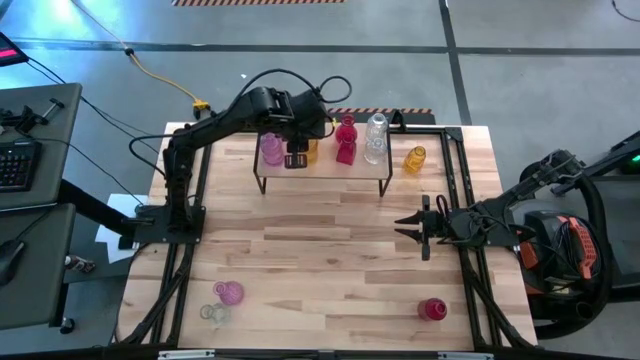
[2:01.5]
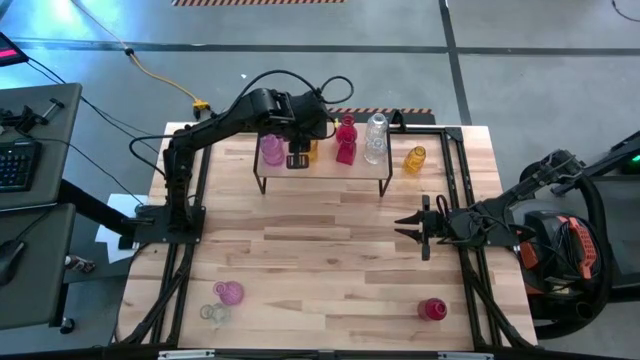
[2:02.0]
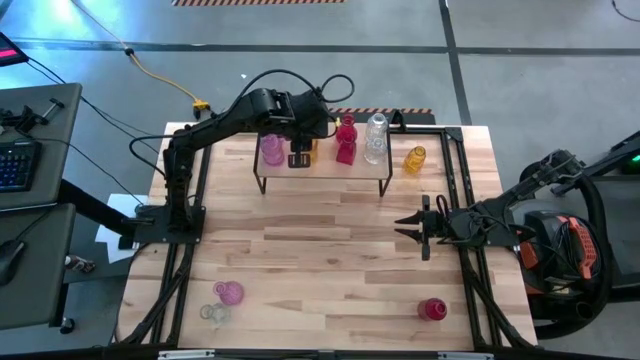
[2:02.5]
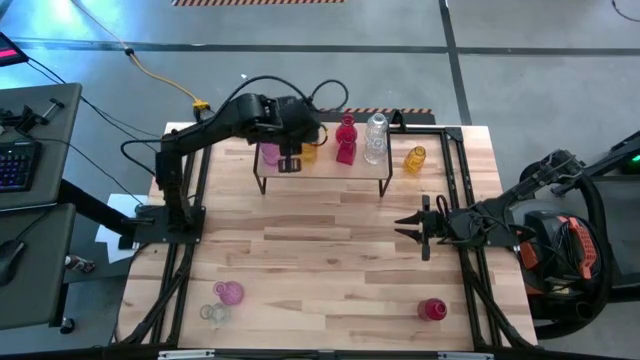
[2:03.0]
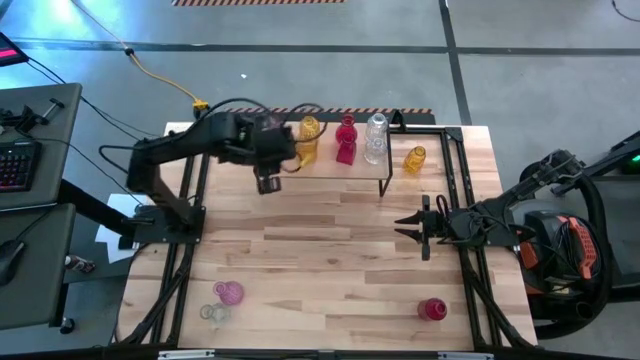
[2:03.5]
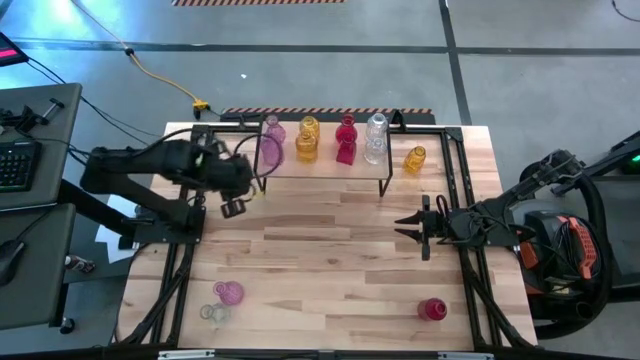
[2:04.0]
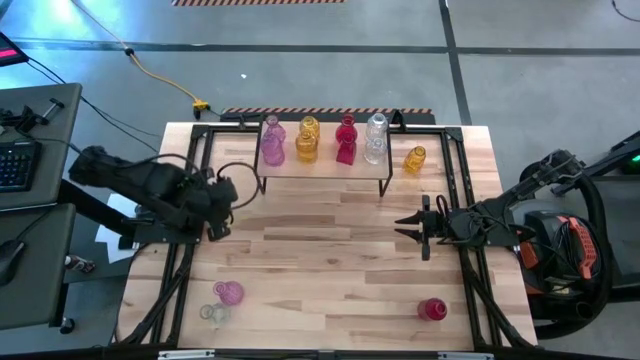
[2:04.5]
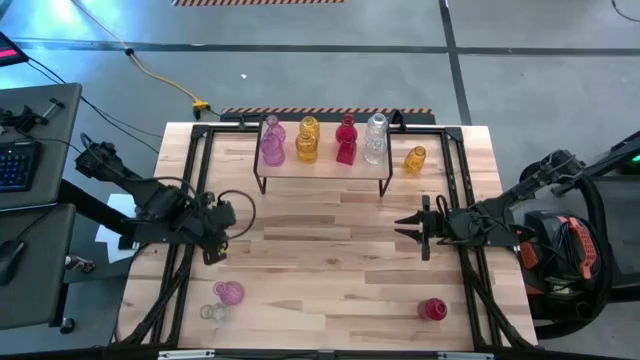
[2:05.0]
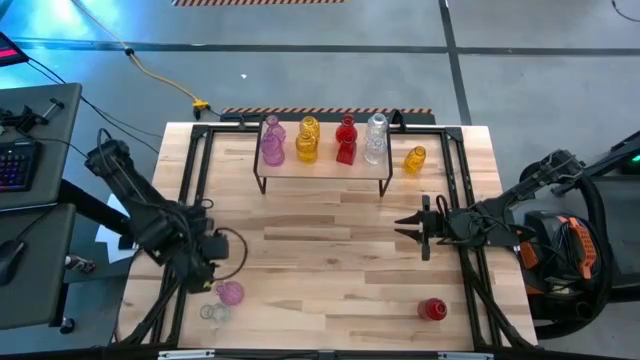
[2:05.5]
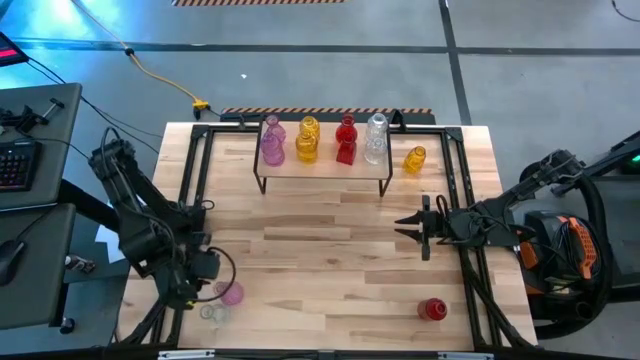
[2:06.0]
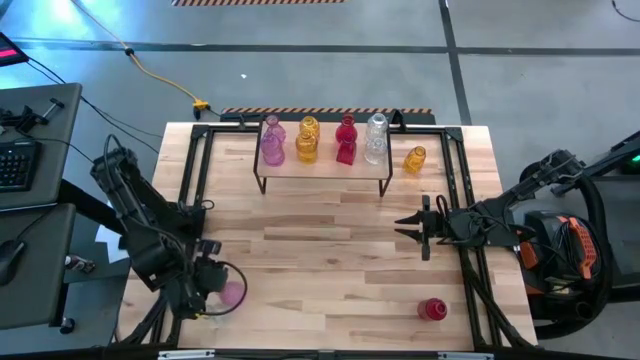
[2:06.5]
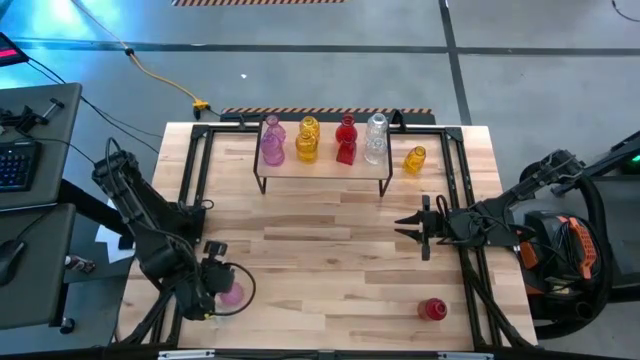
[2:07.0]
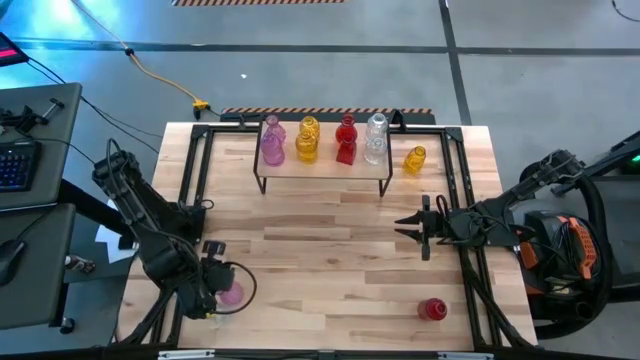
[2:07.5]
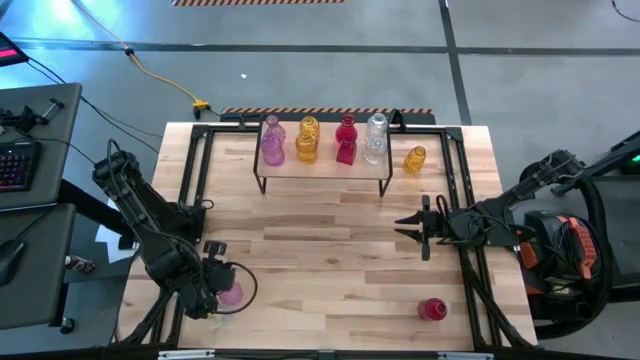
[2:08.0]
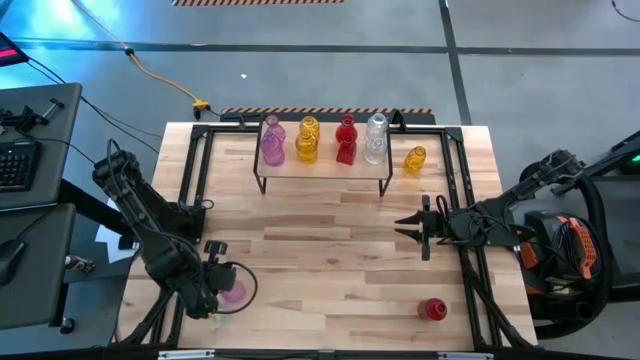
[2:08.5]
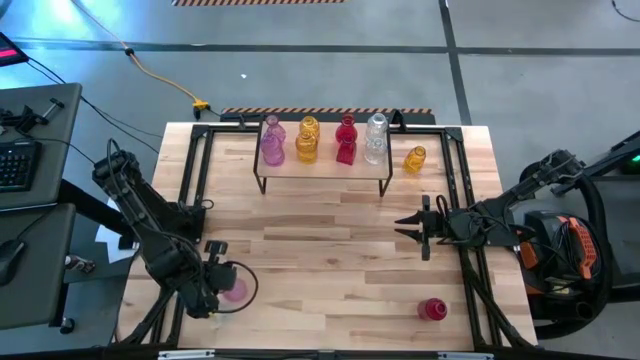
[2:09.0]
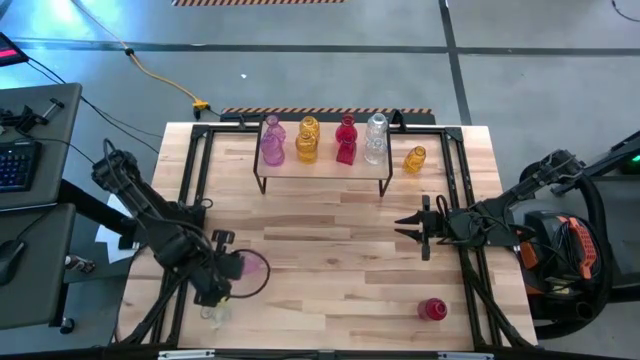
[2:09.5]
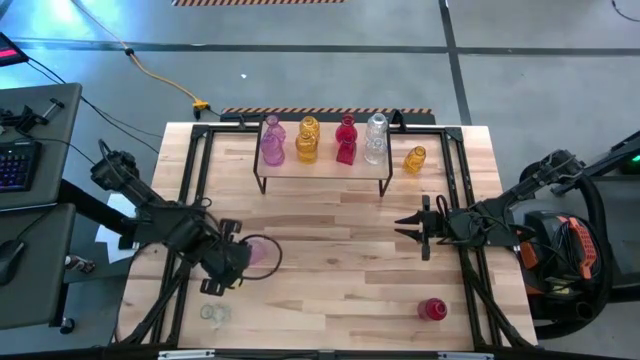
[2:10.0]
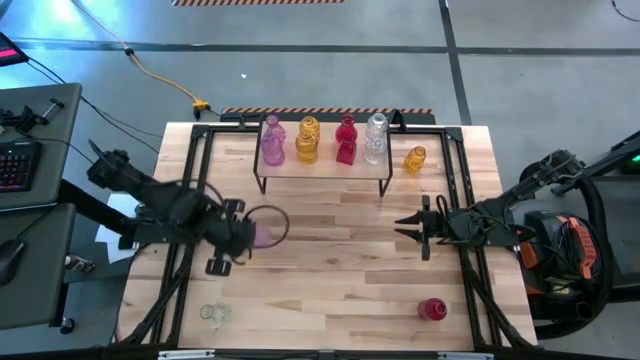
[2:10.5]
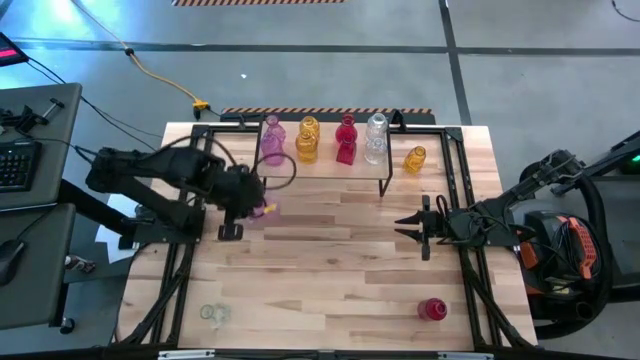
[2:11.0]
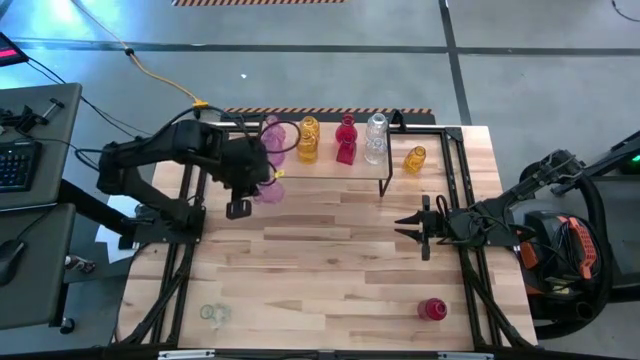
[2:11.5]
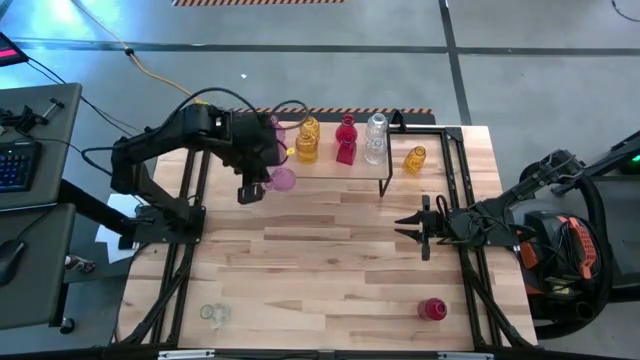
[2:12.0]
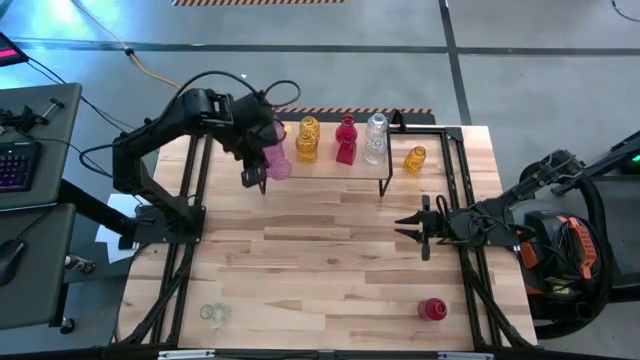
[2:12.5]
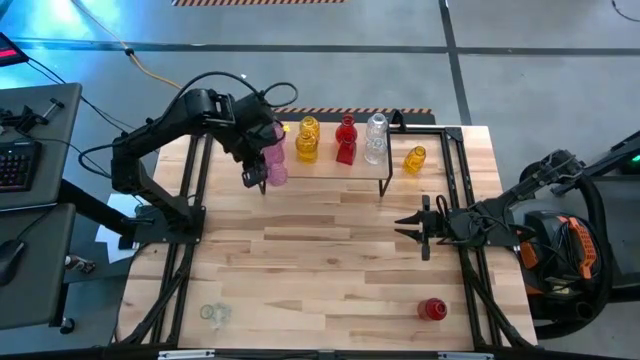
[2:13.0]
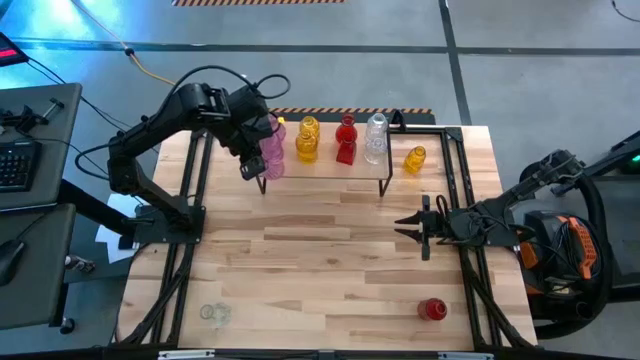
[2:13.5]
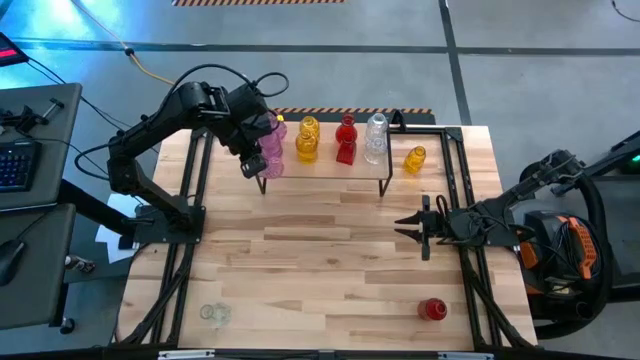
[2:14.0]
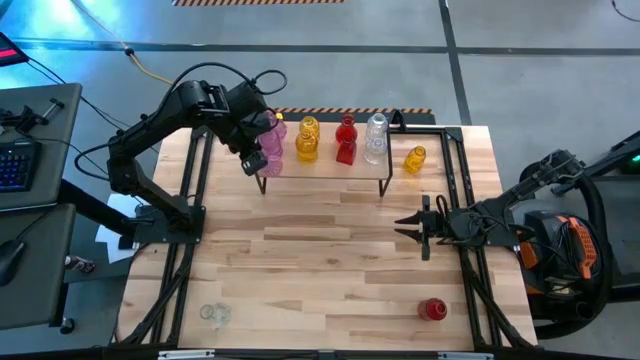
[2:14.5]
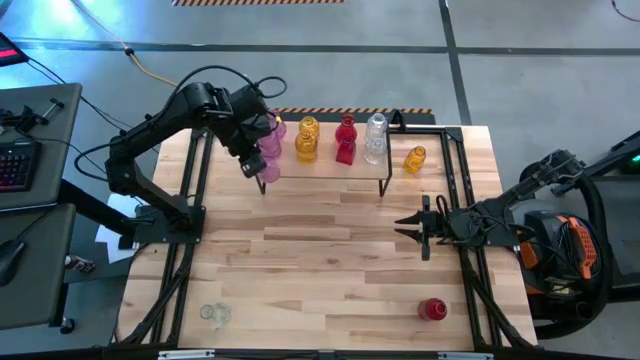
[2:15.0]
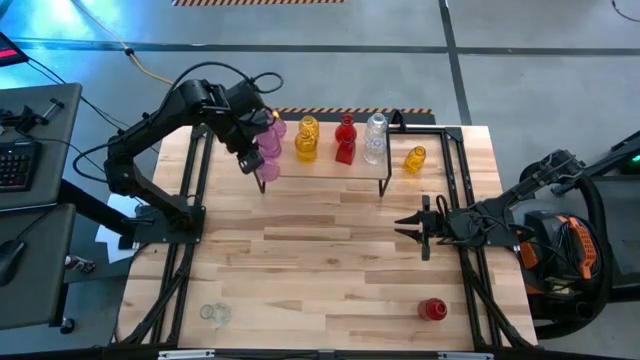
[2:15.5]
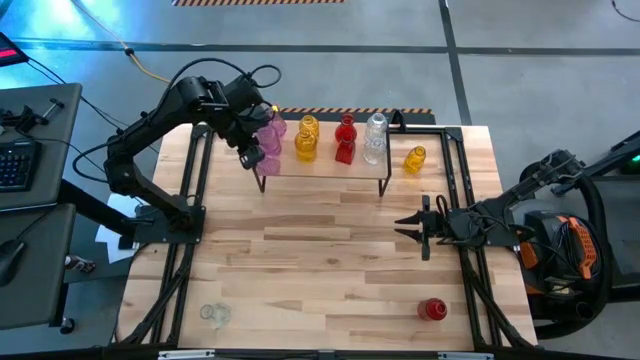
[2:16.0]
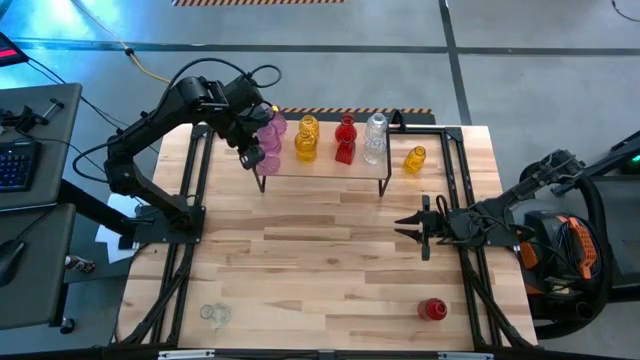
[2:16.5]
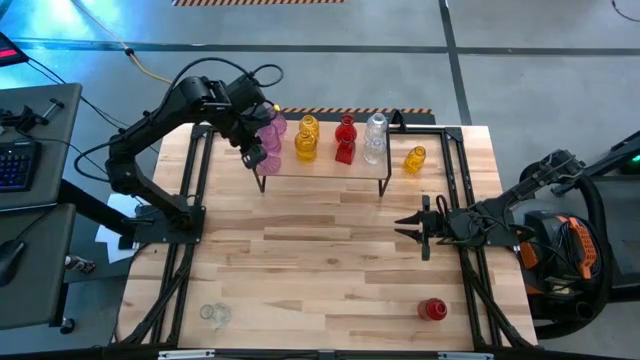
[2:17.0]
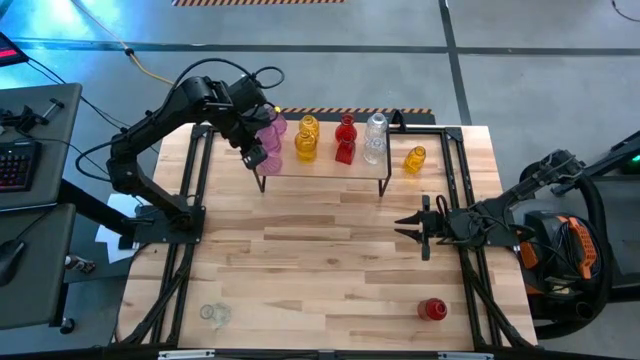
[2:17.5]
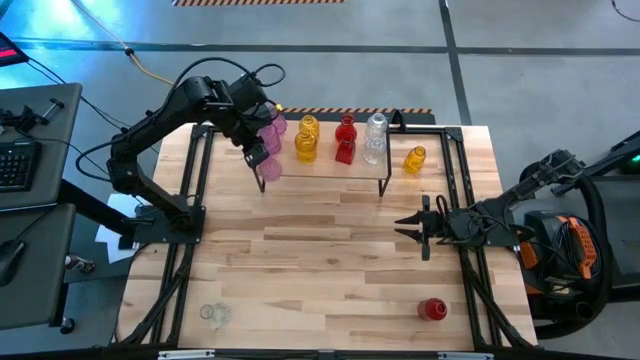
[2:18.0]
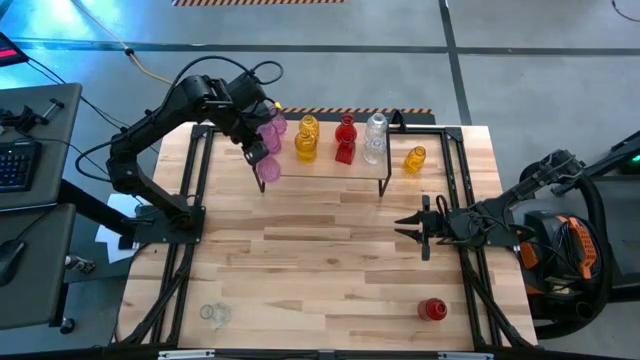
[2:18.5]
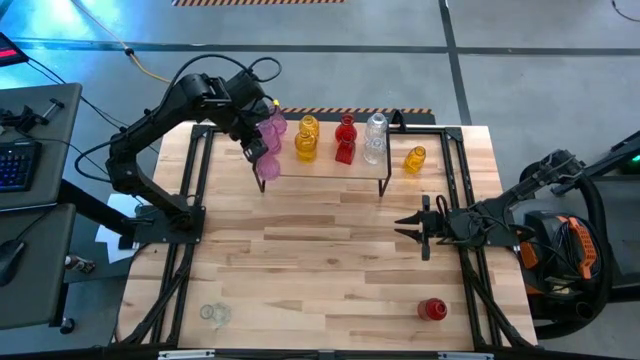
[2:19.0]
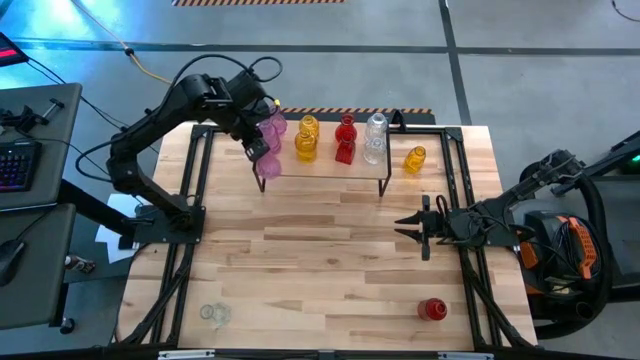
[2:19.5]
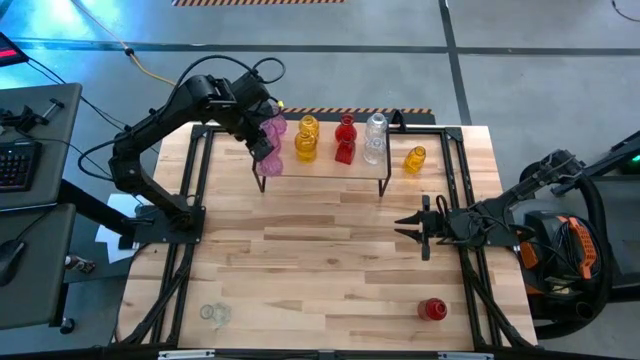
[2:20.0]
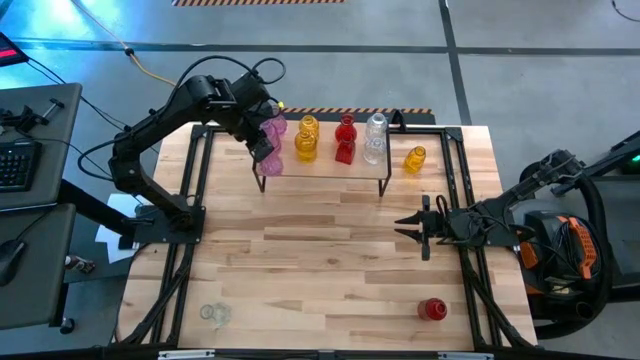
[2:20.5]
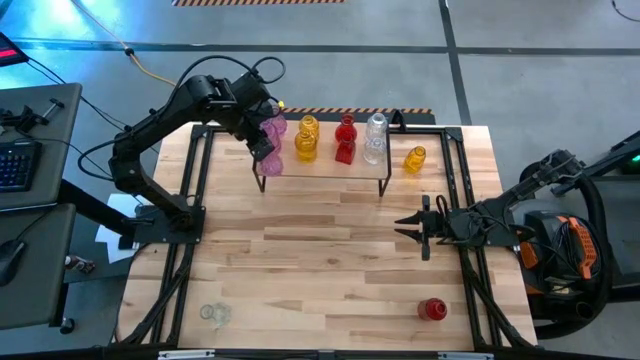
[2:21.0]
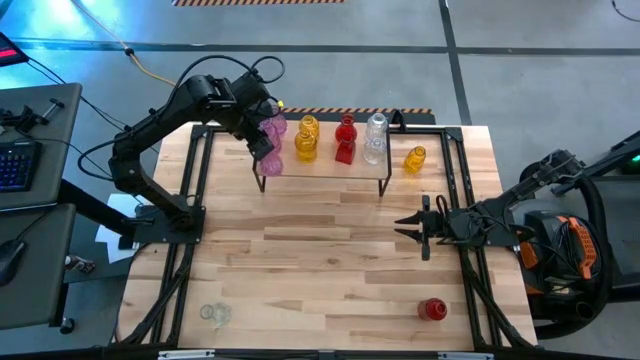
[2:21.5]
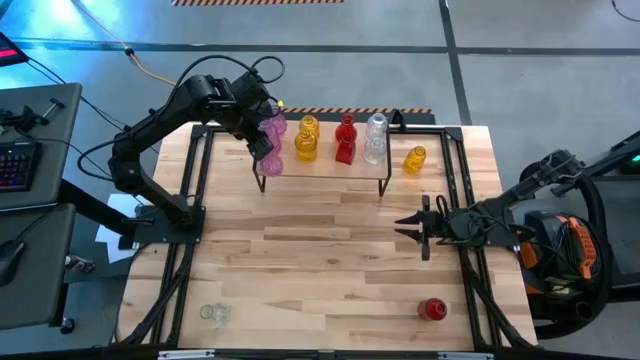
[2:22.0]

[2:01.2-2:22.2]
Task: sort vases onto shelf
Put the purple vase on the shelf aligned with the other purple vases
